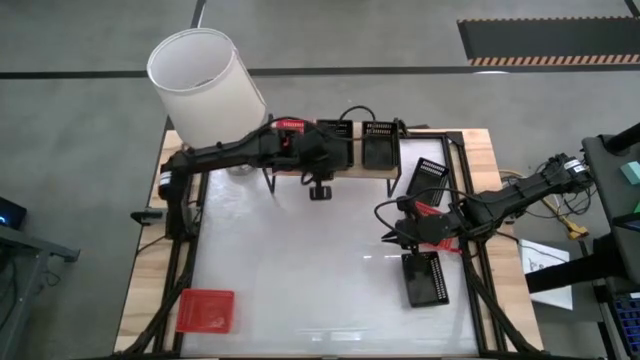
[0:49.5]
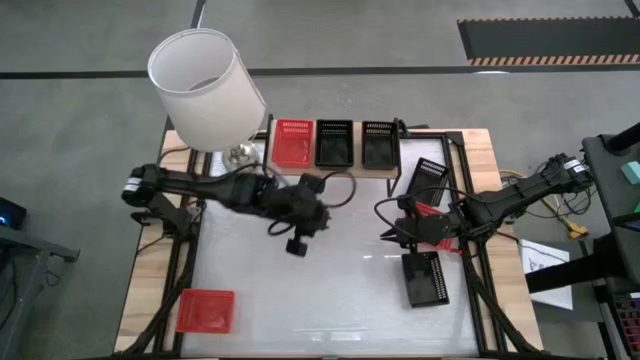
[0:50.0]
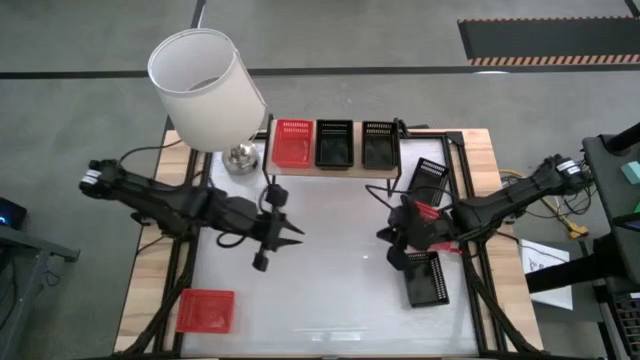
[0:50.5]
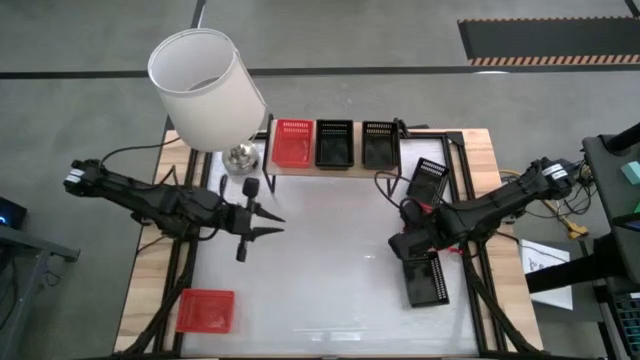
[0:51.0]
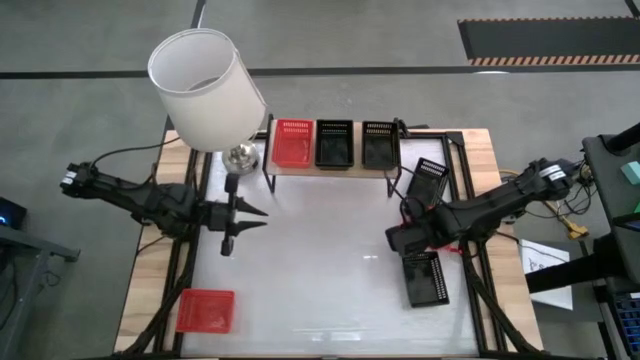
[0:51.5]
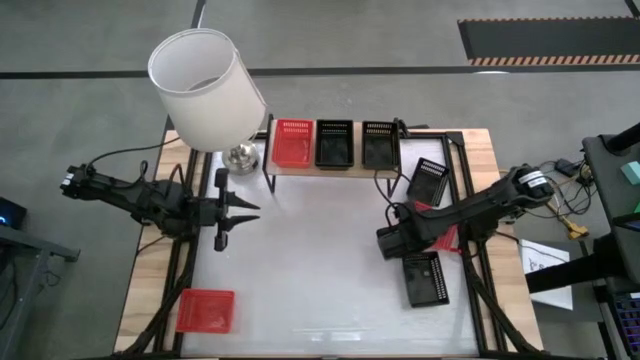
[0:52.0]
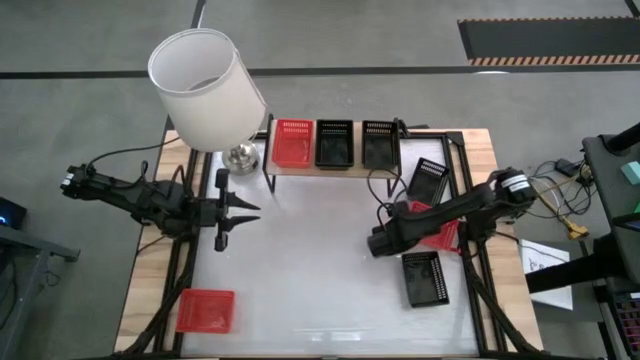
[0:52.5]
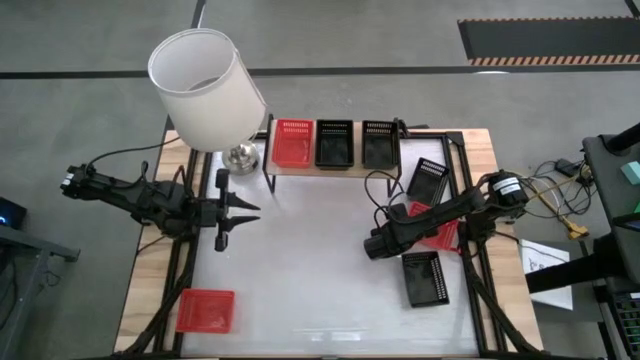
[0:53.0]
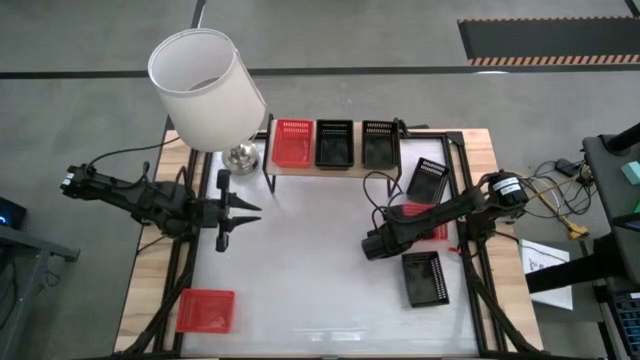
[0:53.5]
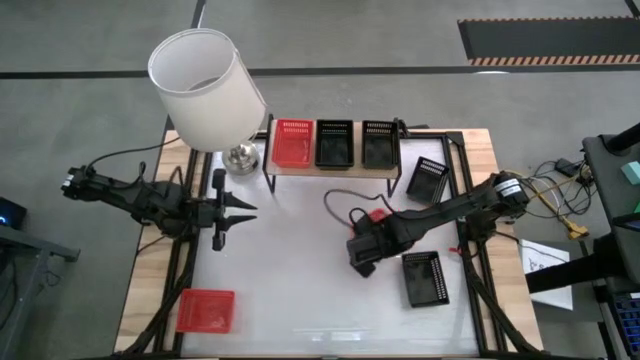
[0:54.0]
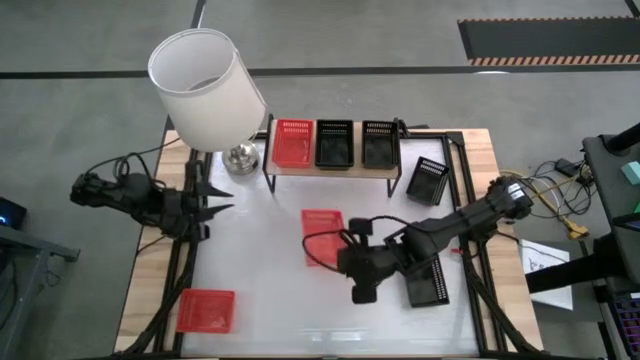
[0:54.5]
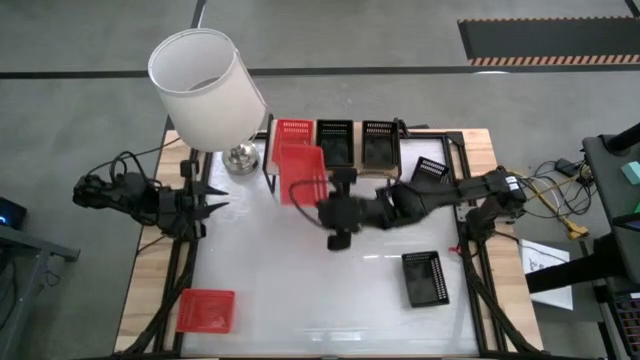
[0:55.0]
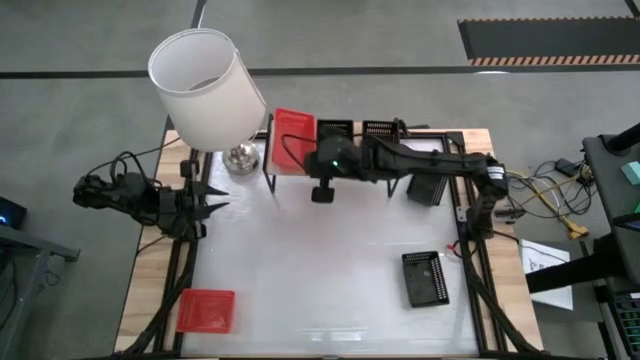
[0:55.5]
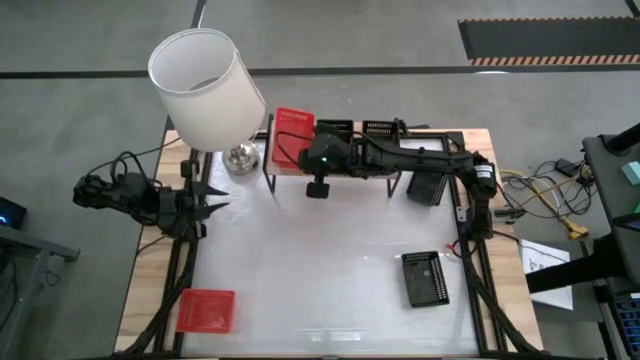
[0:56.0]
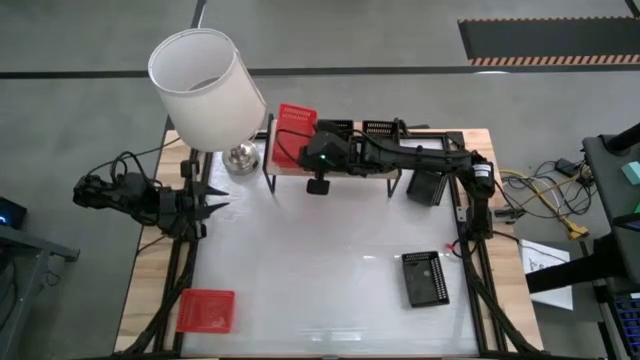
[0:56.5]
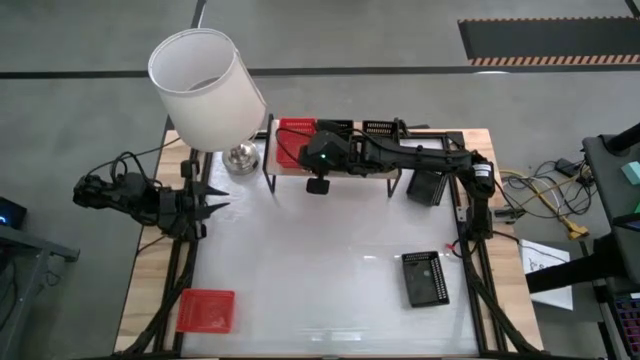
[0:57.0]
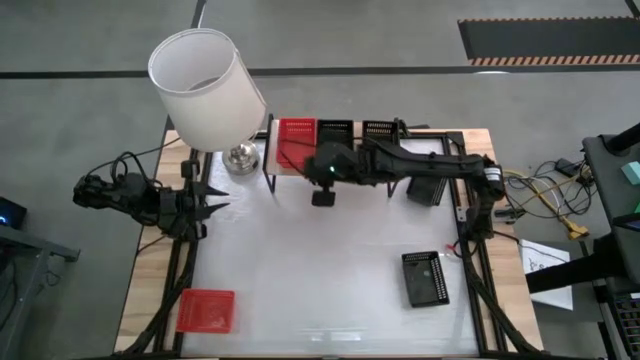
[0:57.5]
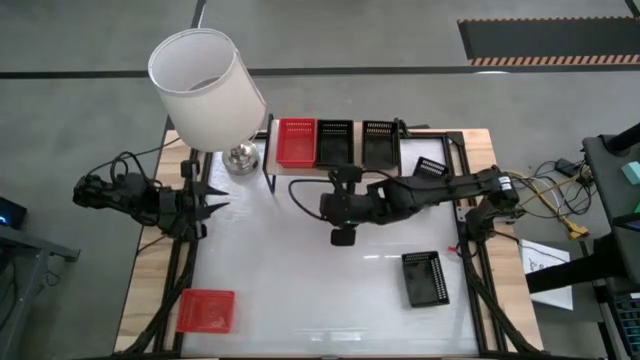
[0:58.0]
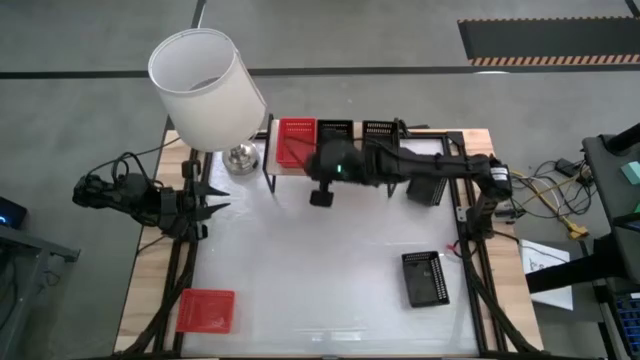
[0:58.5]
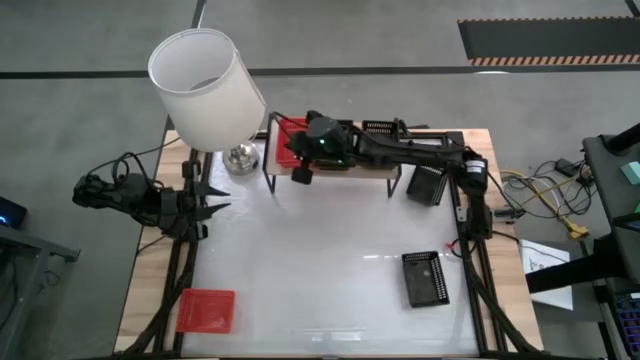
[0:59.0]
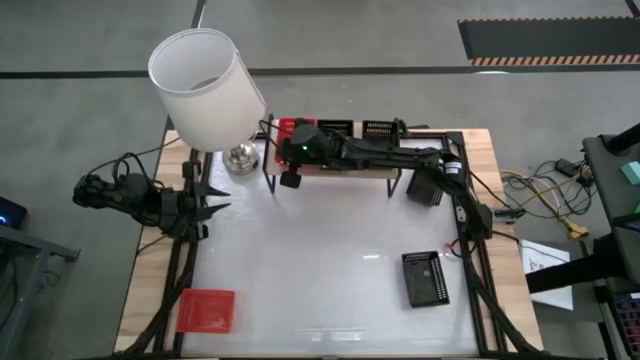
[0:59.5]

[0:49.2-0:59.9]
Stack the right red basket into the other red basket on the shelf

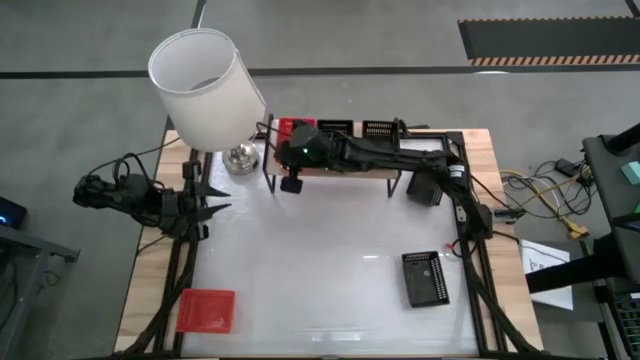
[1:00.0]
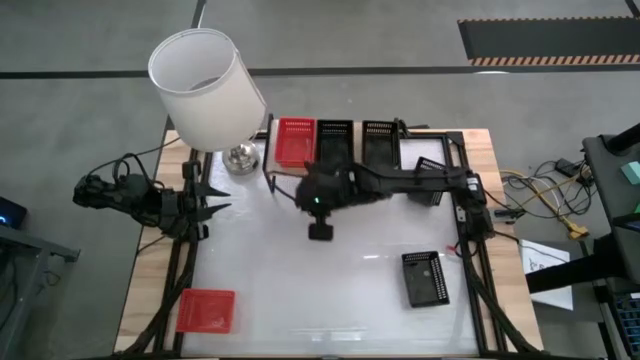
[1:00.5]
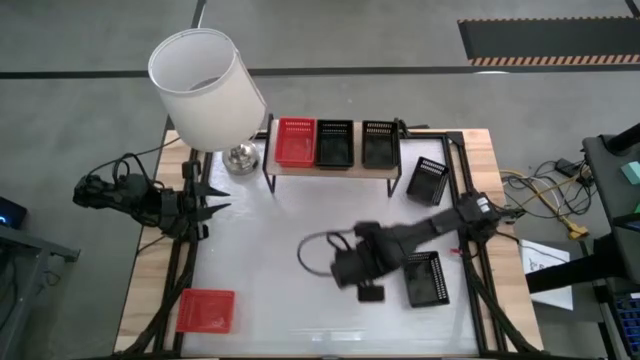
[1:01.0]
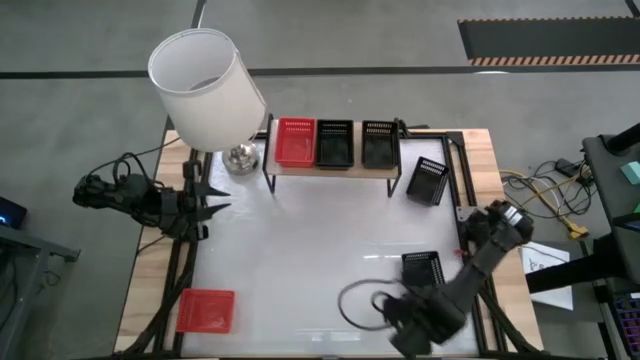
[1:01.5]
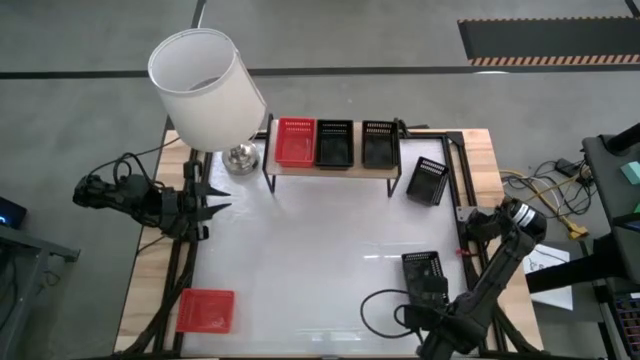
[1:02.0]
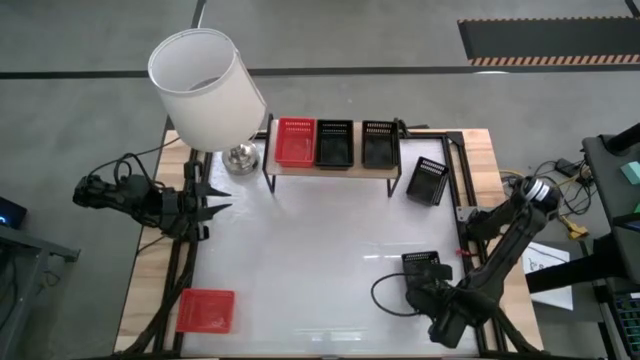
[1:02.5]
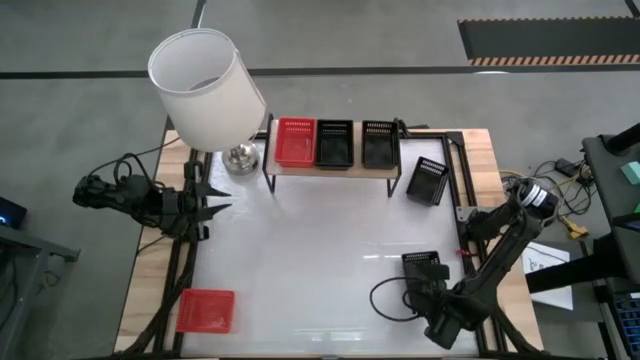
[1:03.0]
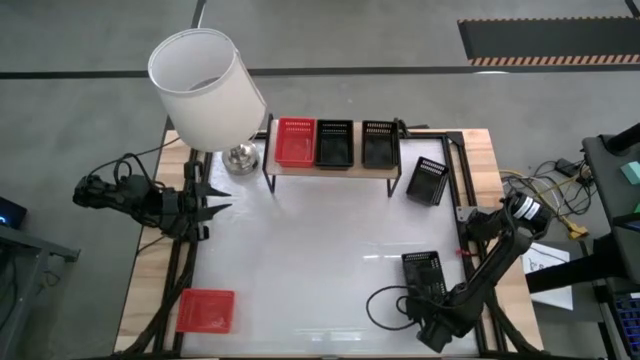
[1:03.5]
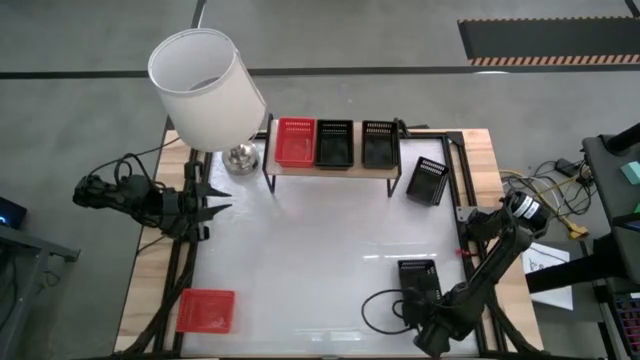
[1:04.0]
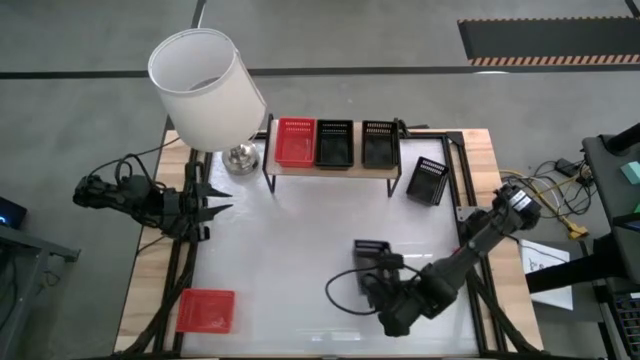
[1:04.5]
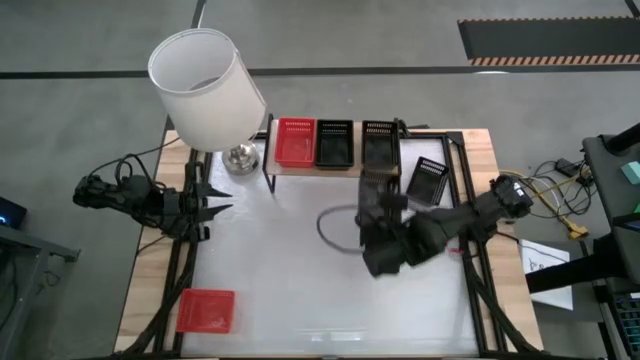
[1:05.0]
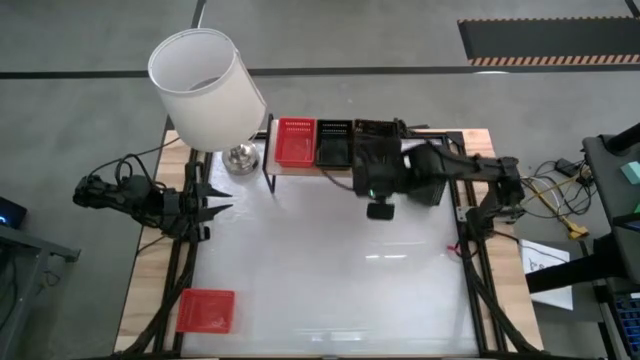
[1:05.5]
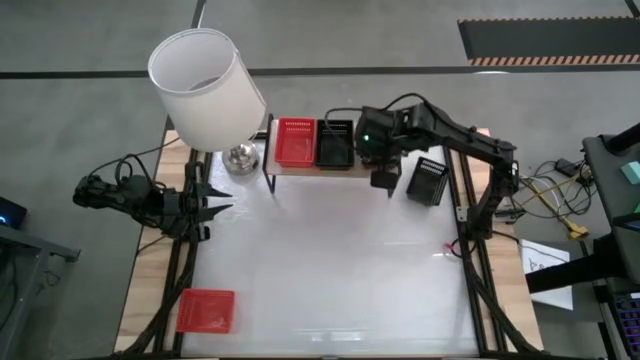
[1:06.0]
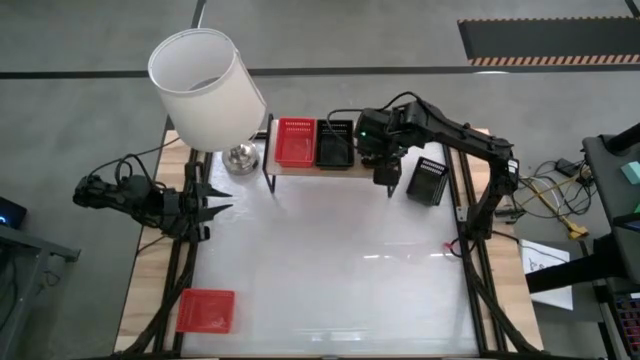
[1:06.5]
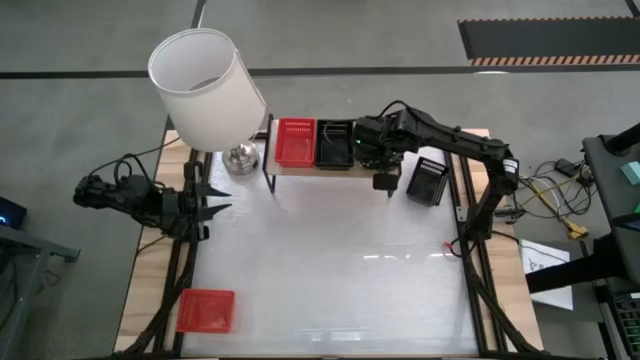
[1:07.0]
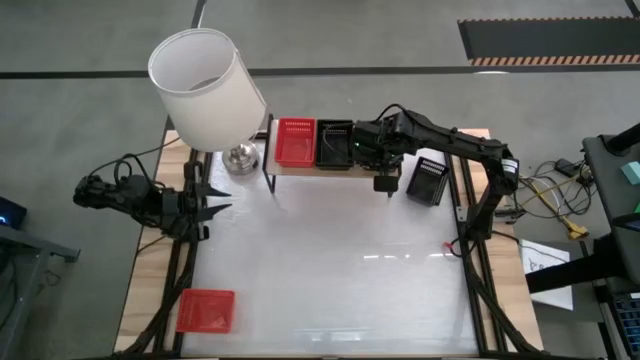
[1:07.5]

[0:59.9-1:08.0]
Stack the black basket into the other black basket on the shelf
